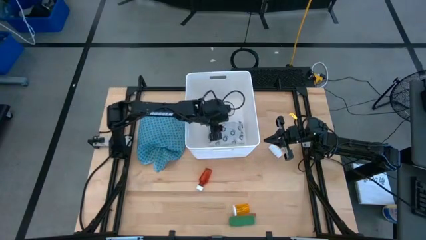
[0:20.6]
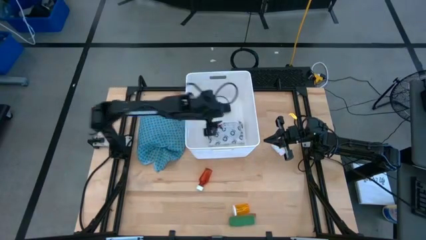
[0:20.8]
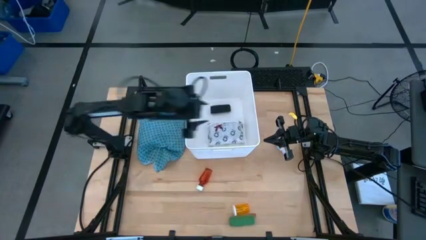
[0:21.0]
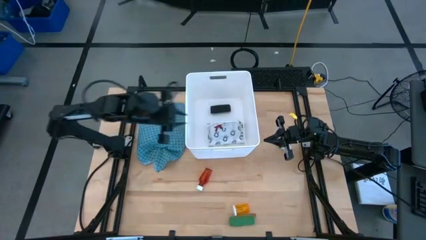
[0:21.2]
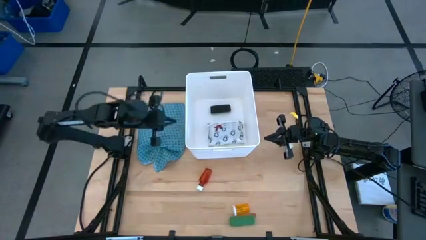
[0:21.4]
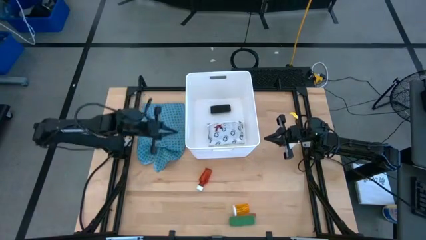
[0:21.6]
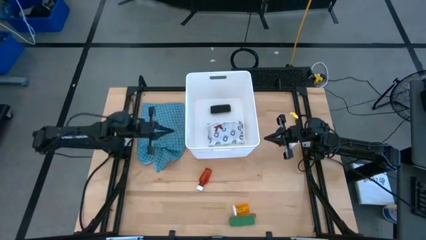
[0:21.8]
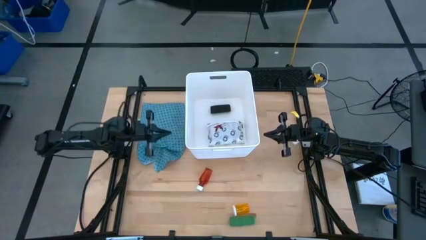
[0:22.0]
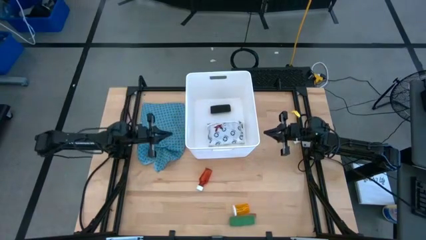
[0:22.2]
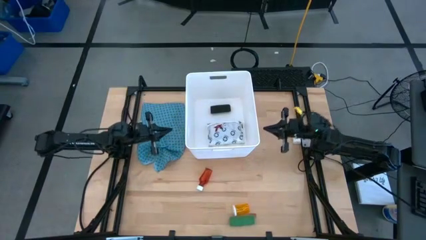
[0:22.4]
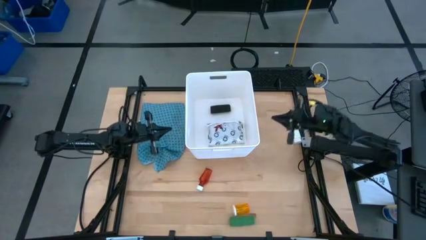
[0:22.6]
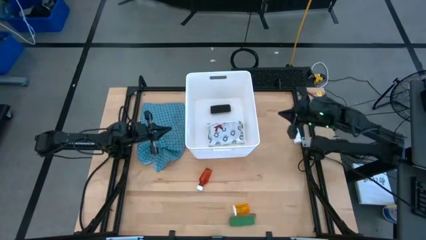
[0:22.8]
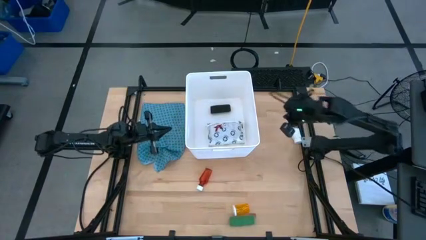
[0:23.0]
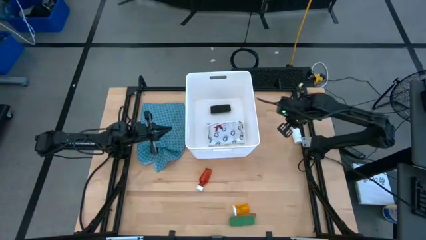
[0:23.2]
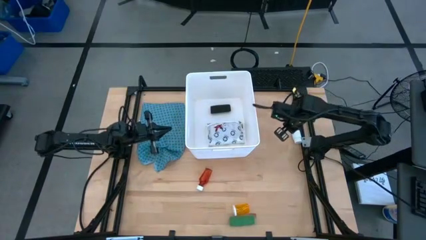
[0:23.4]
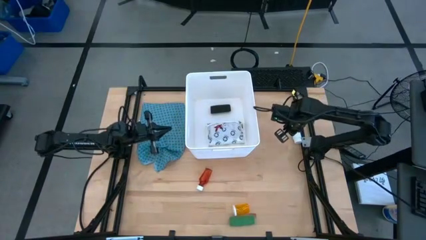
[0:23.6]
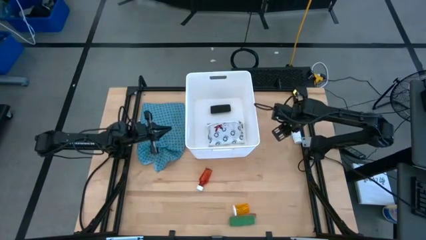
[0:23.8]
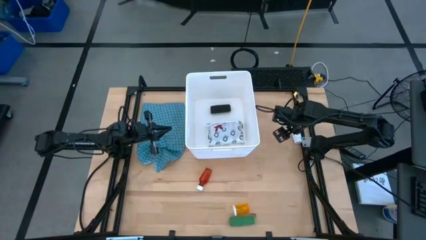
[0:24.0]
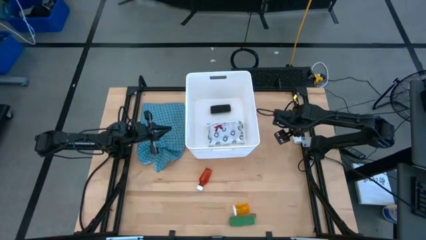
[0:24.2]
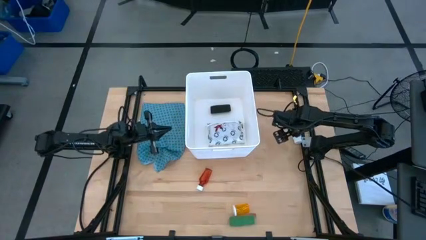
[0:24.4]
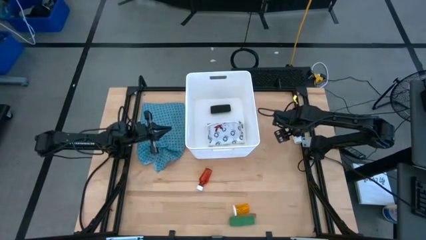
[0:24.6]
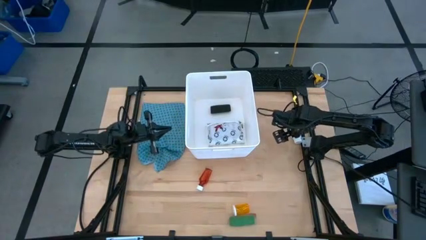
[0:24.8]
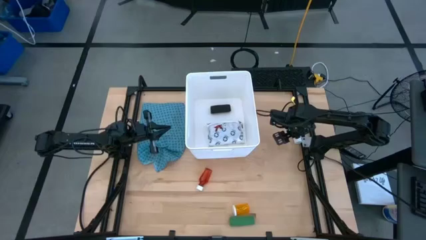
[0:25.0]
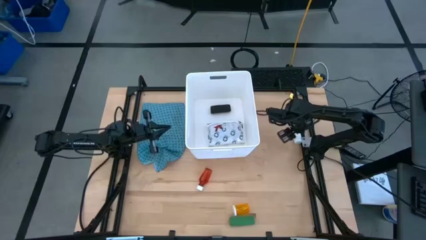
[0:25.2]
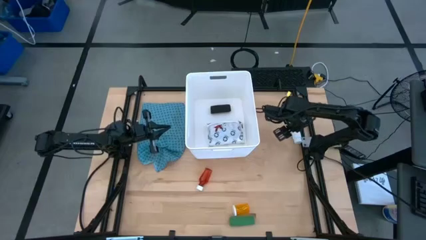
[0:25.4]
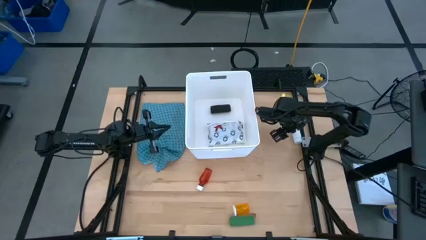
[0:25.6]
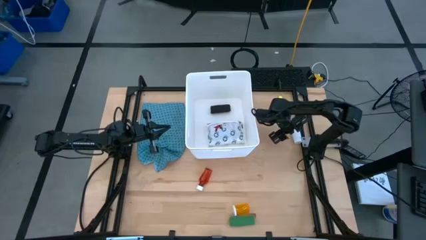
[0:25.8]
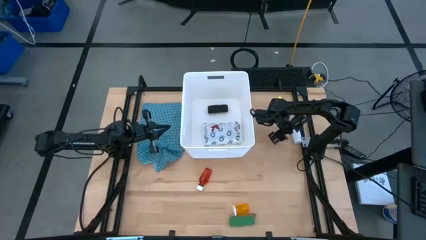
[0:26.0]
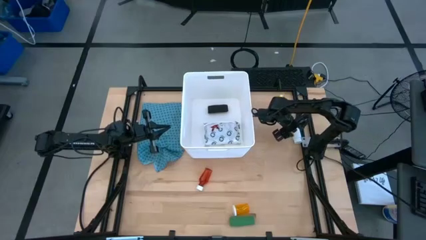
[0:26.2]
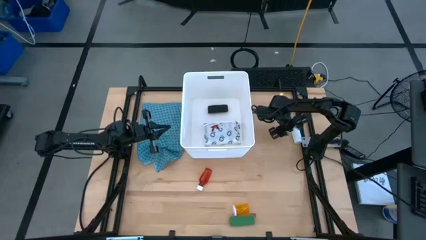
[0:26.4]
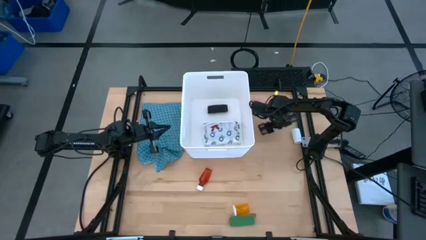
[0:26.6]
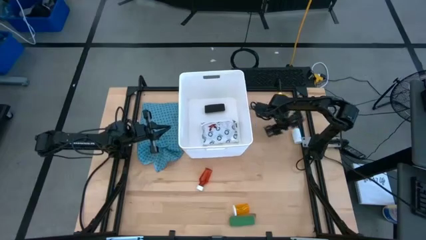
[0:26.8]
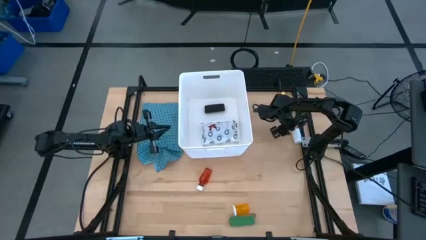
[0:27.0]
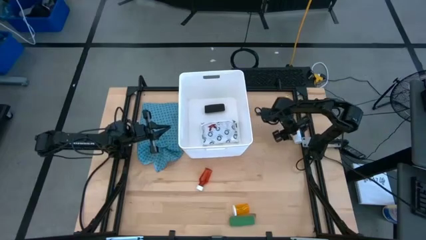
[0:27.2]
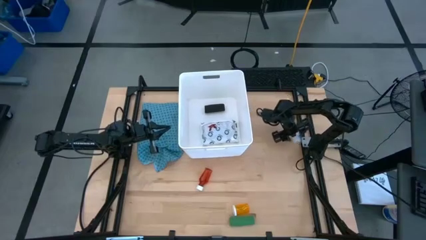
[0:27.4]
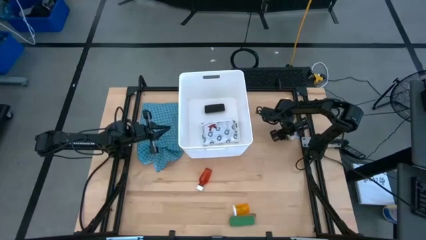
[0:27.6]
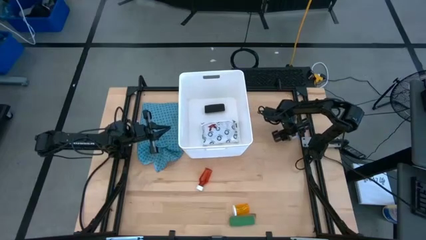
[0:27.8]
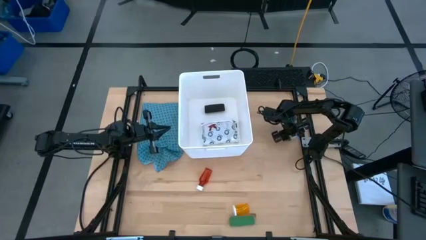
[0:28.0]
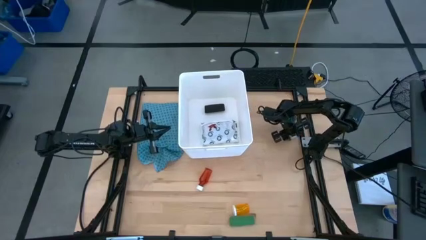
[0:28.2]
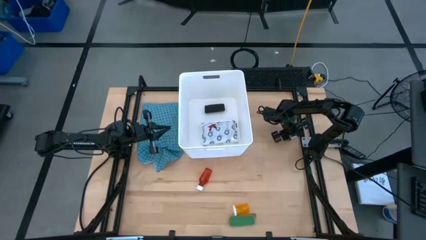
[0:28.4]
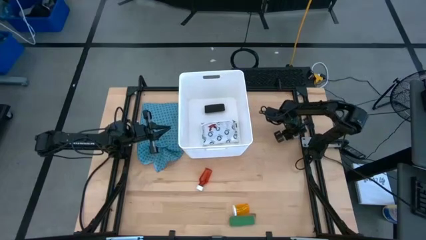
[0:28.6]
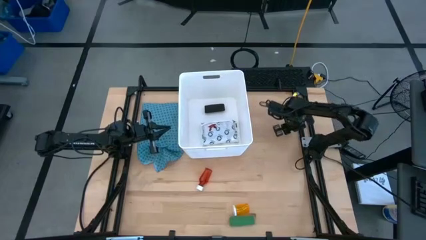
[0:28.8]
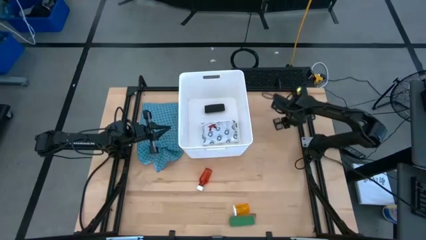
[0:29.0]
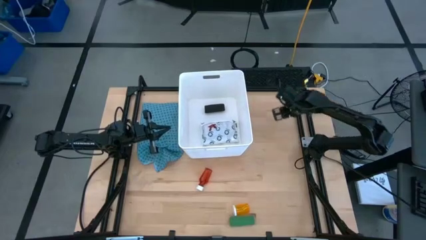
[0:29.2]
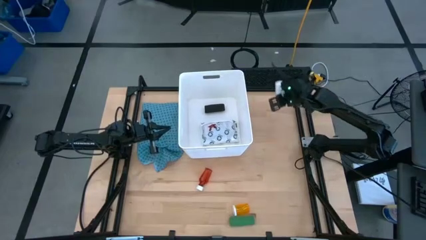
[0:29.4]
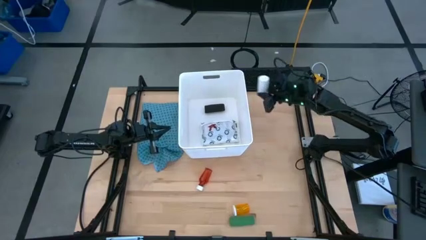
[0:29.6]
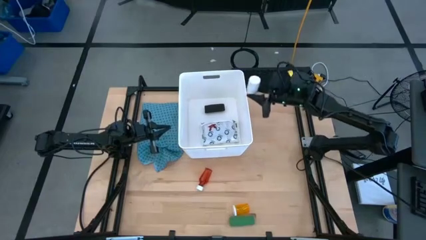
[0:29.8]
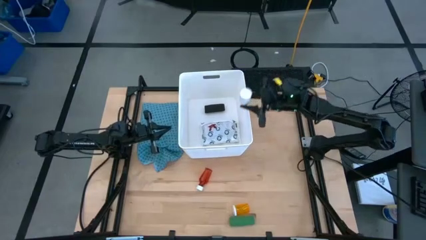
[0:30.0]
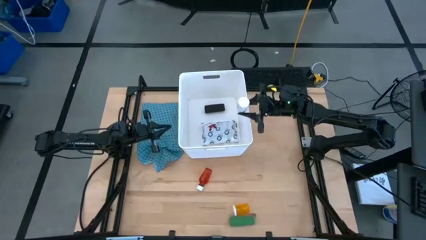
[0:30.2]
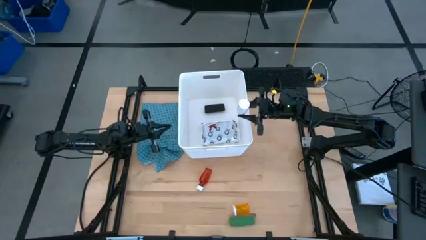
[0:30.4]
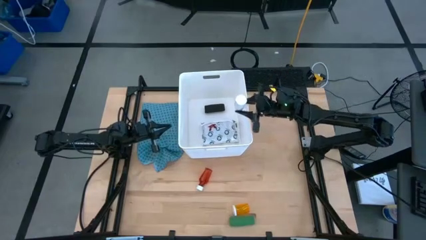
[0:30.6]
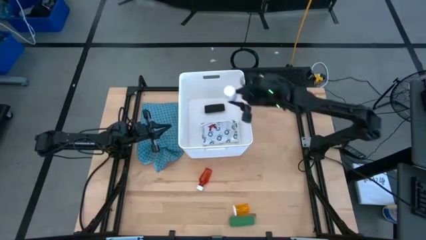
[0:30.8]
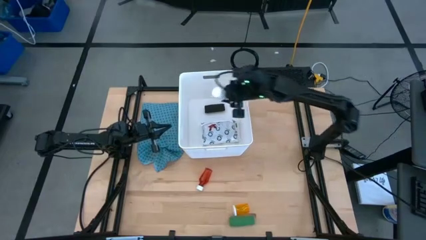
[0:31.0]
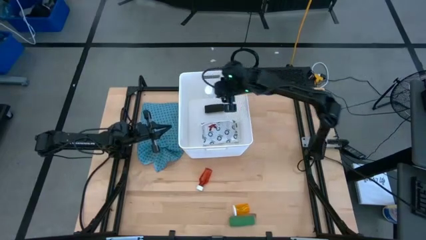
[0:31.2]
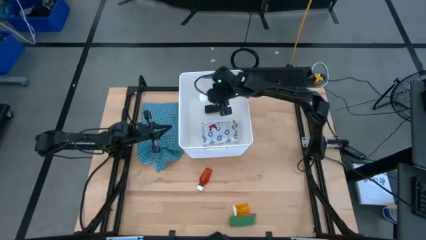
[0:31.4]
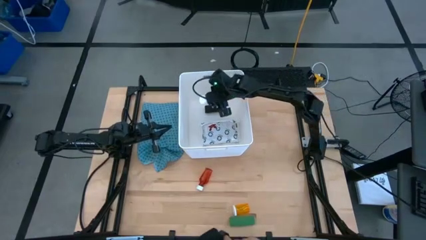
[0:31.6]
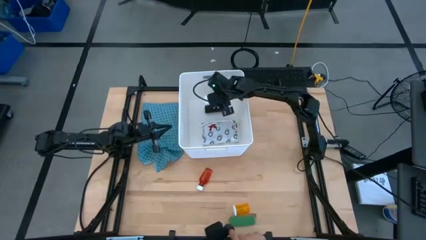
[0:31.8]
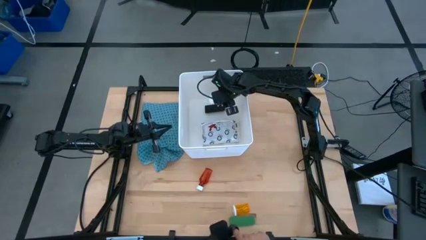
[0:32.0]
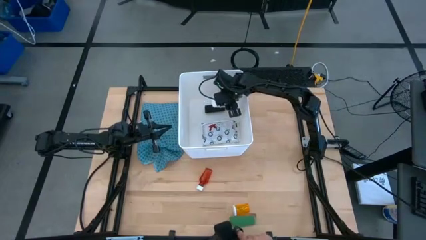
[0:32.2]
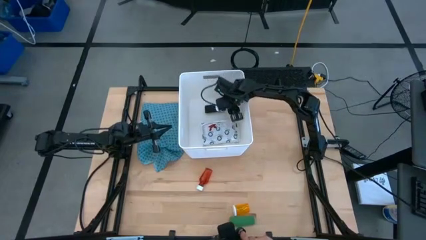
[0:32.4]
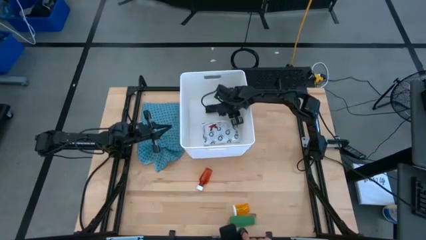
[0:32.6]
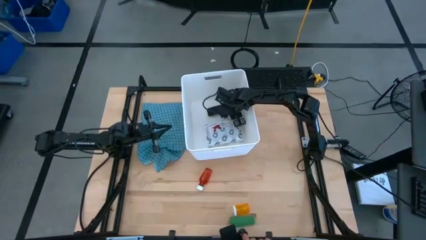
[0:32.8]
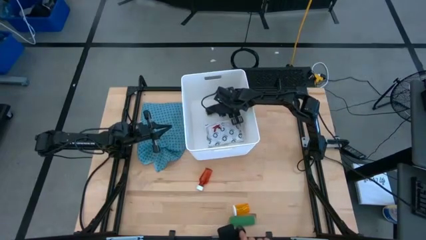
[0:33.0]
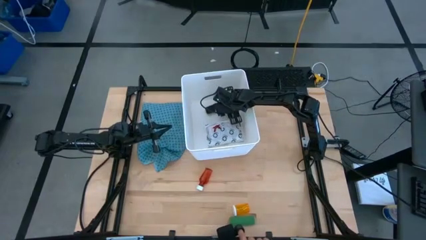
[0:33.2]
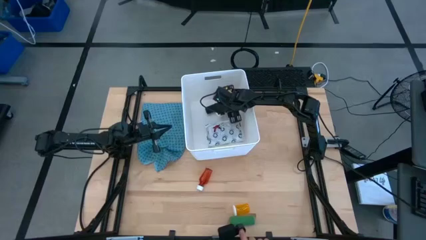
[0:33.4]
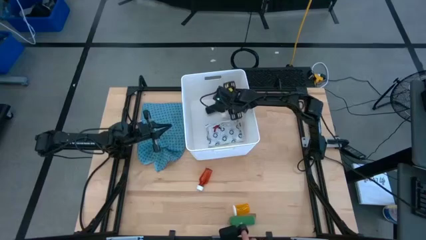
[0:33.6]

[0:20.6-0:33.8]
Task: Pick & place medical supplies in basket/bin
Put the white pill bottle into the white bin

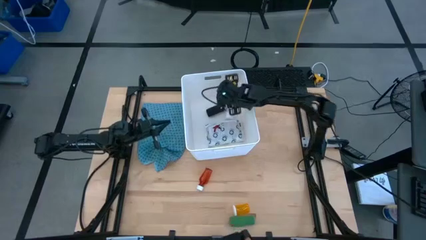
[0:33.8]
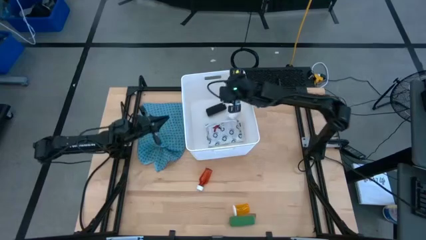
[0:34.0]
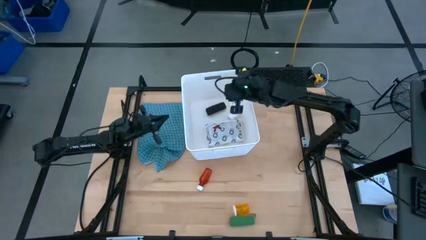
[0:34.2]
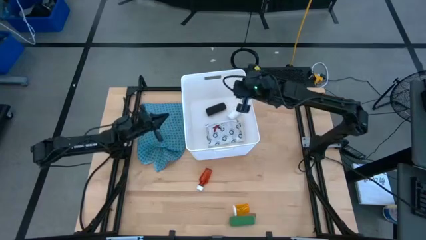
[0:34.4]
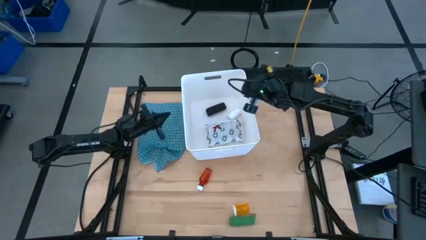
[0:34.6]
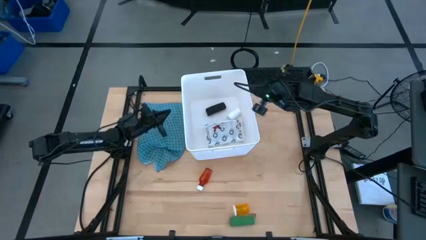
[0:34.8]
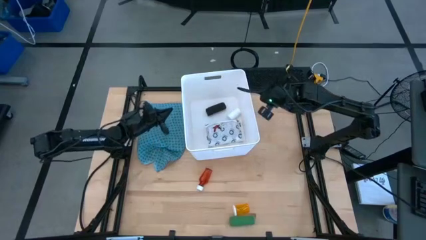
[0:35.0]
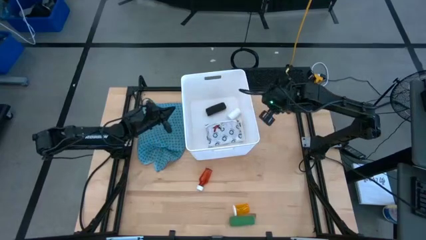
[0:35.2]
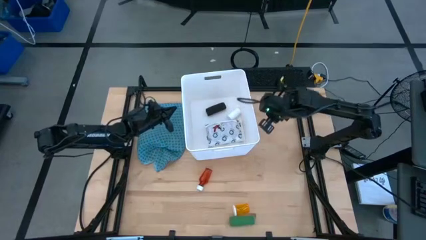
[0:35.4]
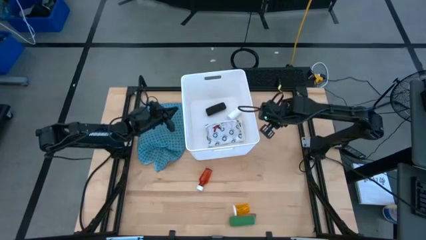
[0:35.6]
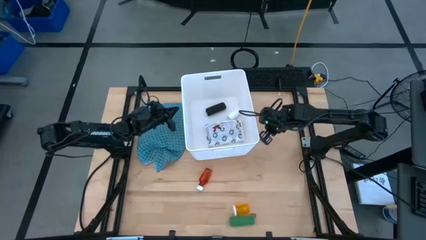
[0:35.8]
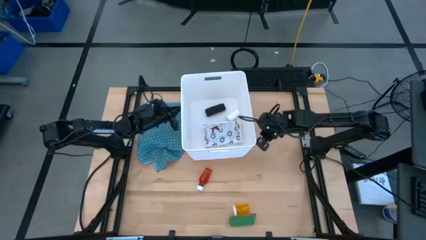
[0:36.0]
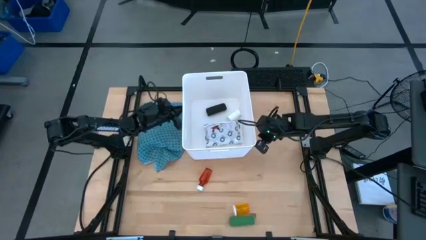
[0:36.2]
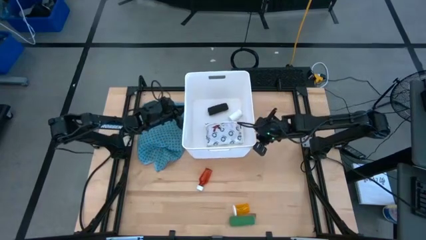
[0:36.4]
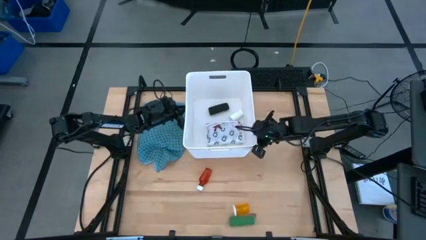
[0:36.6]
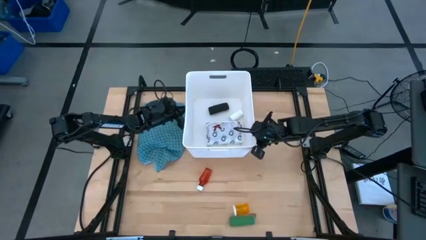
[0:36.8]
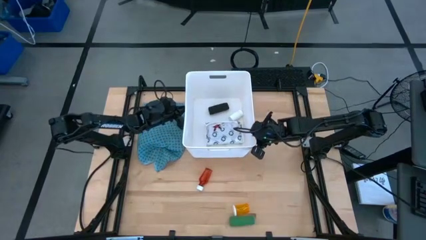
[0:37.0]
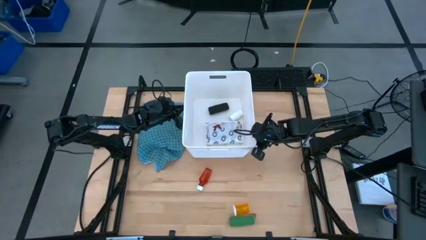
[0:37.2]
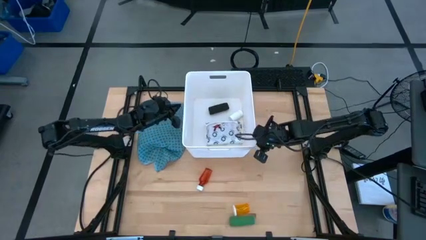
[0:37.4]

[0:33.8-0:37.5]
Adjust the white bin
